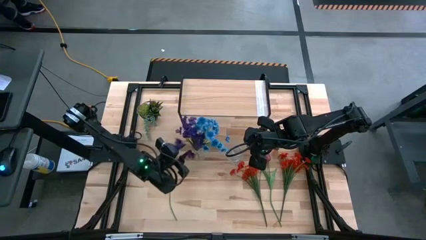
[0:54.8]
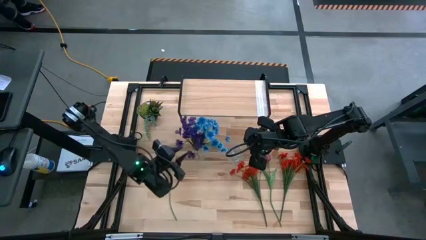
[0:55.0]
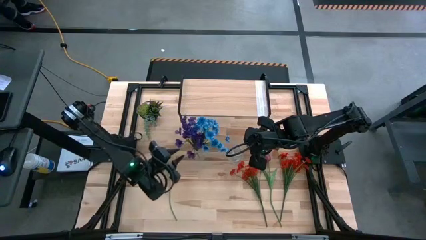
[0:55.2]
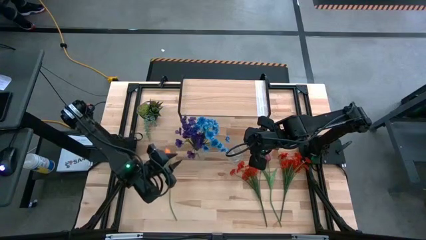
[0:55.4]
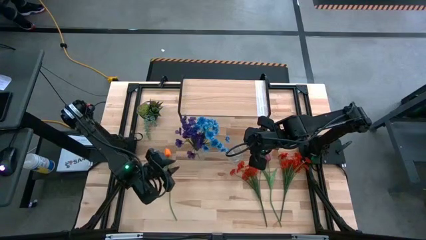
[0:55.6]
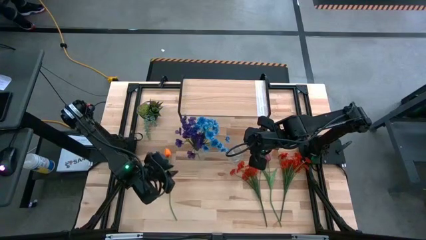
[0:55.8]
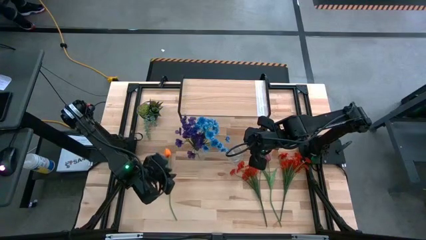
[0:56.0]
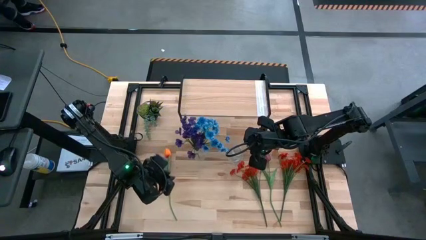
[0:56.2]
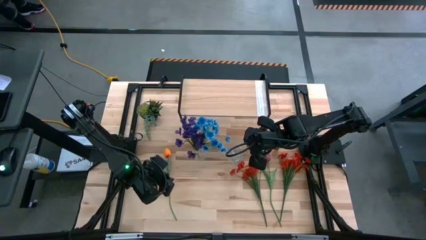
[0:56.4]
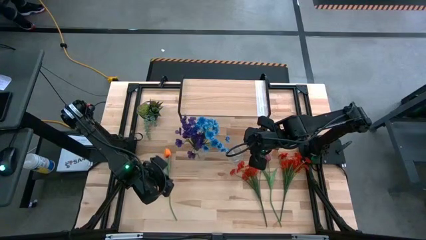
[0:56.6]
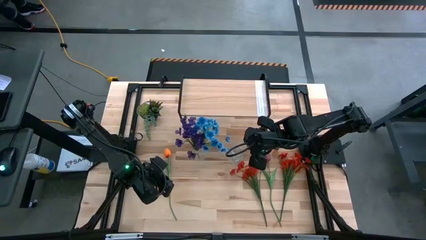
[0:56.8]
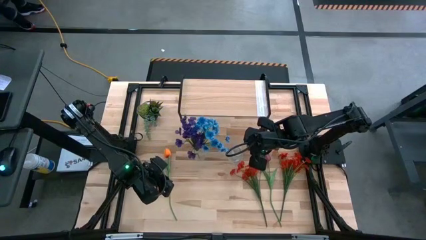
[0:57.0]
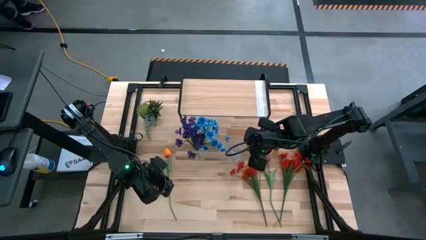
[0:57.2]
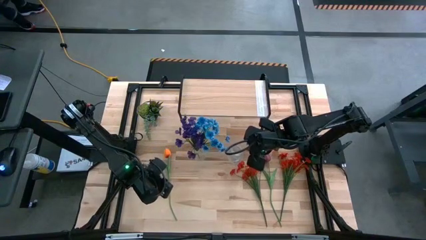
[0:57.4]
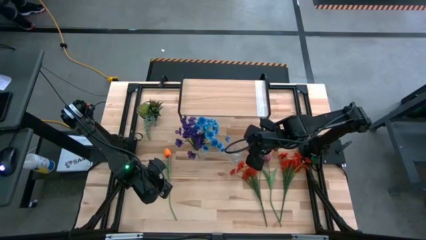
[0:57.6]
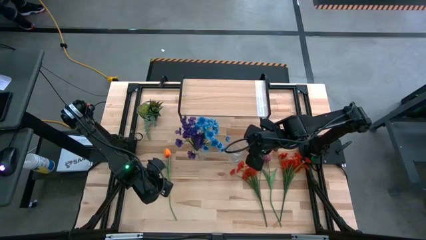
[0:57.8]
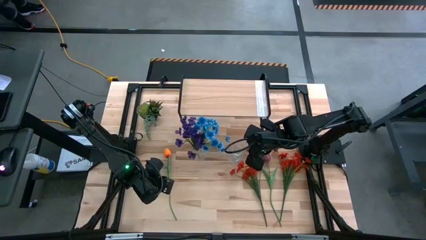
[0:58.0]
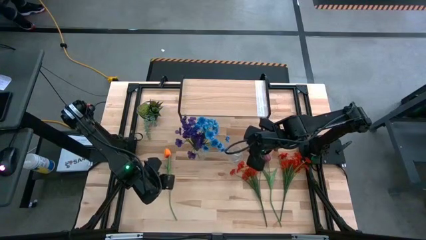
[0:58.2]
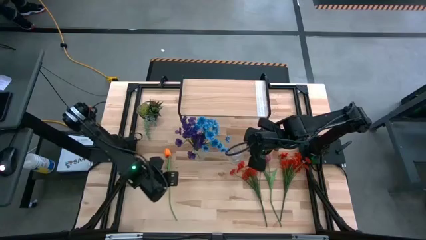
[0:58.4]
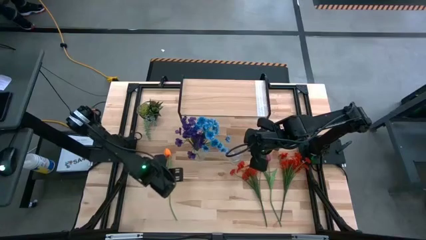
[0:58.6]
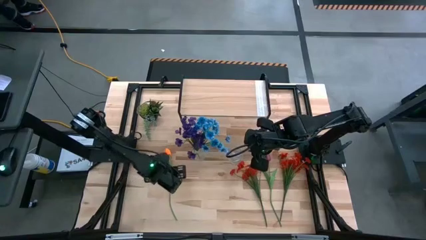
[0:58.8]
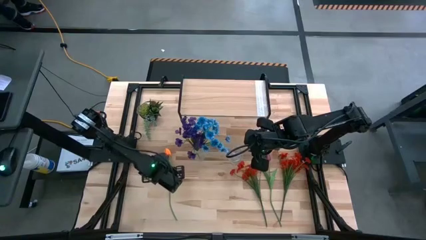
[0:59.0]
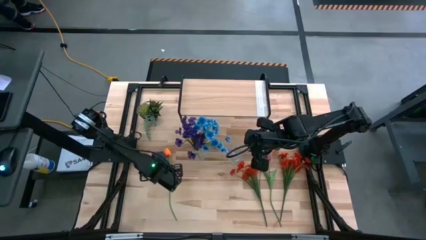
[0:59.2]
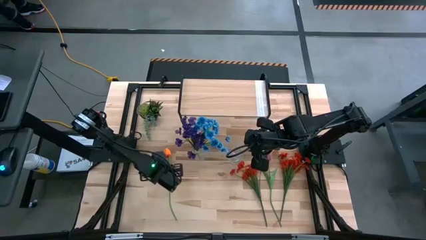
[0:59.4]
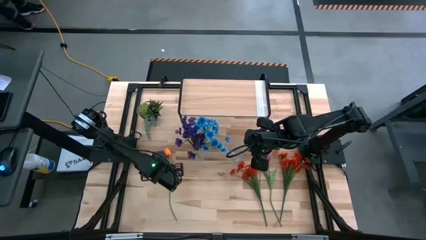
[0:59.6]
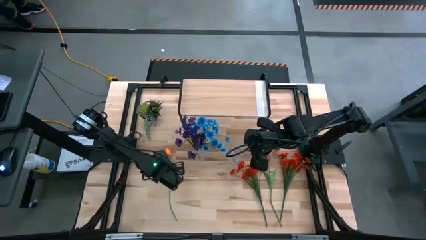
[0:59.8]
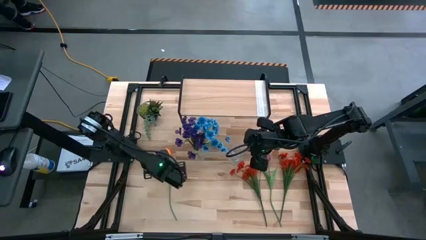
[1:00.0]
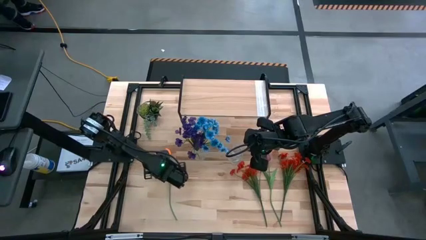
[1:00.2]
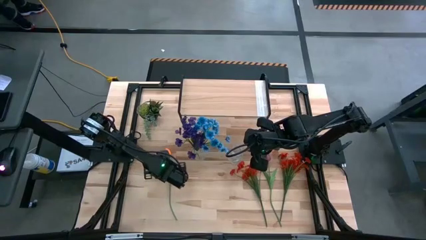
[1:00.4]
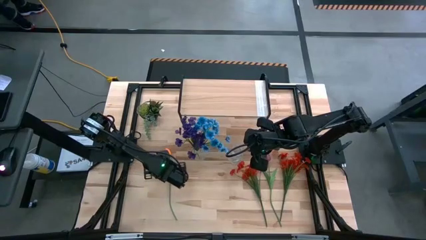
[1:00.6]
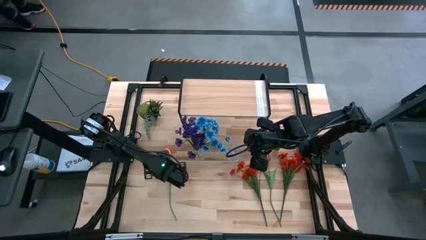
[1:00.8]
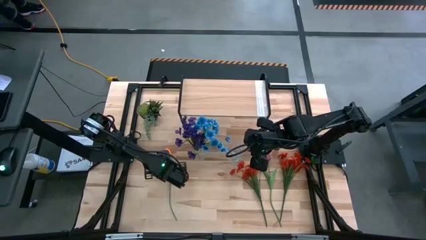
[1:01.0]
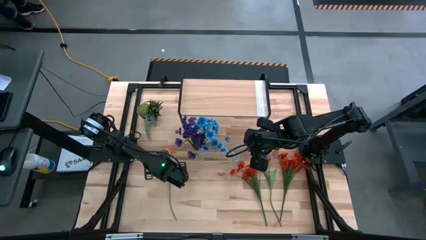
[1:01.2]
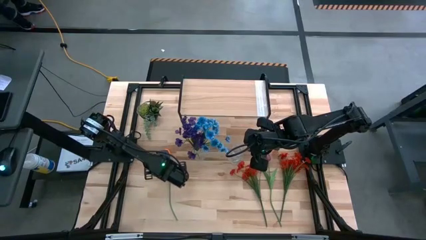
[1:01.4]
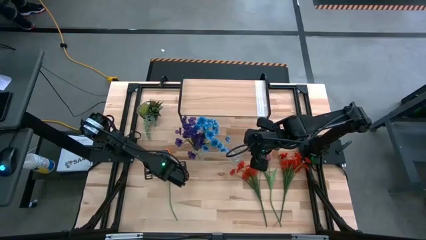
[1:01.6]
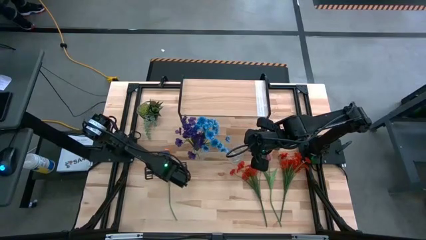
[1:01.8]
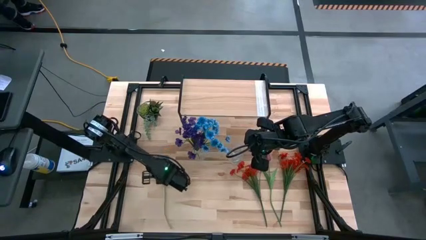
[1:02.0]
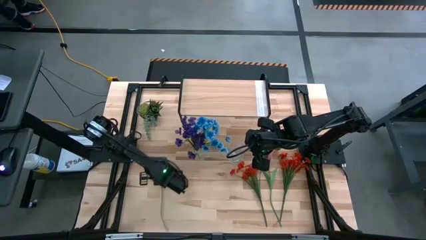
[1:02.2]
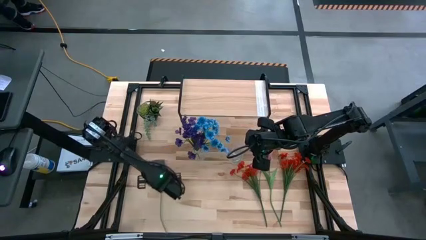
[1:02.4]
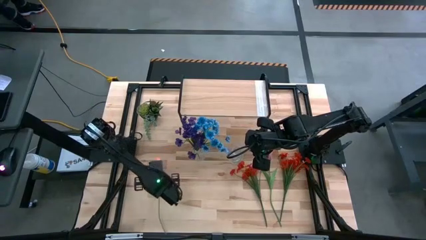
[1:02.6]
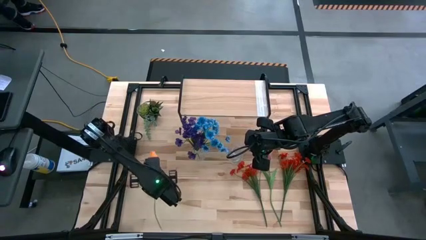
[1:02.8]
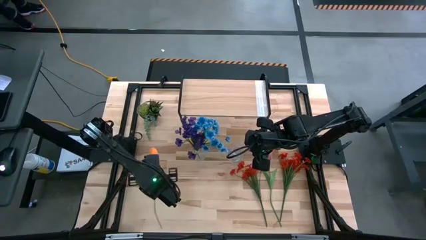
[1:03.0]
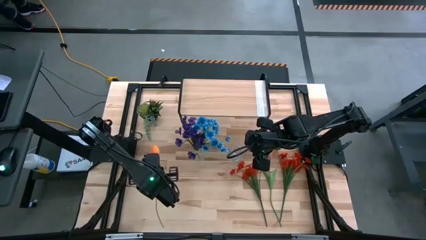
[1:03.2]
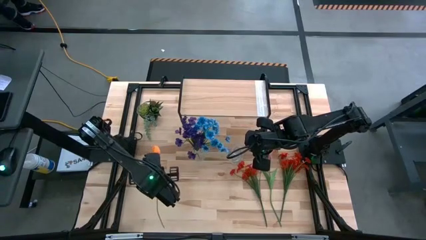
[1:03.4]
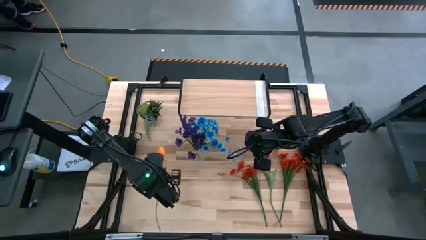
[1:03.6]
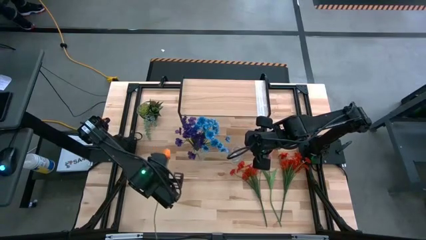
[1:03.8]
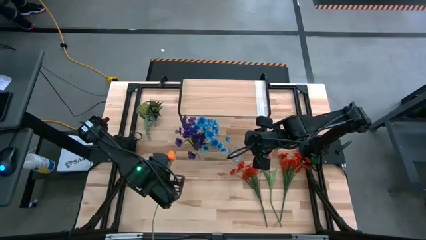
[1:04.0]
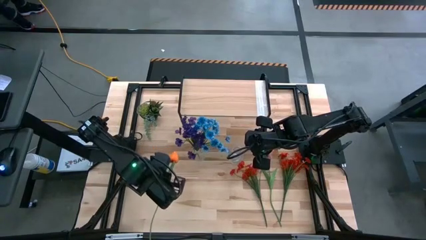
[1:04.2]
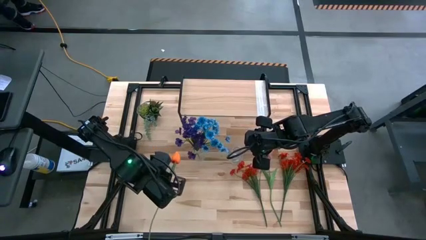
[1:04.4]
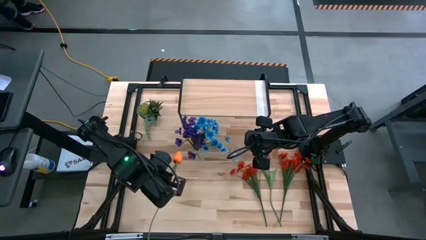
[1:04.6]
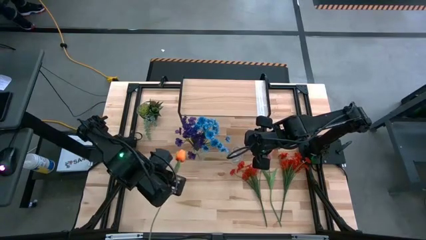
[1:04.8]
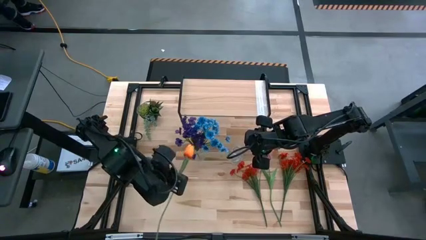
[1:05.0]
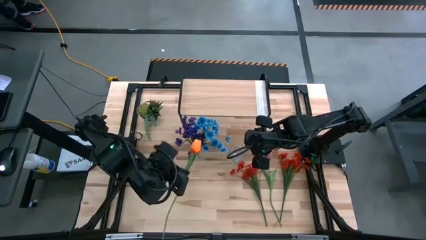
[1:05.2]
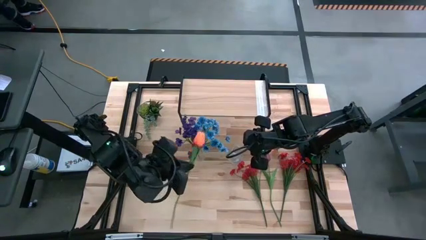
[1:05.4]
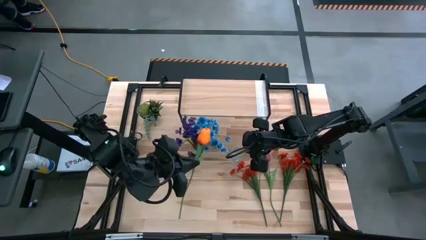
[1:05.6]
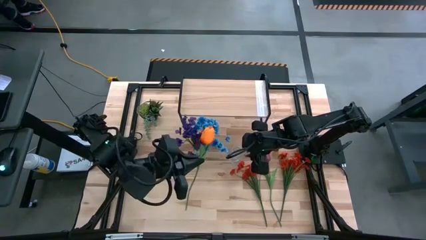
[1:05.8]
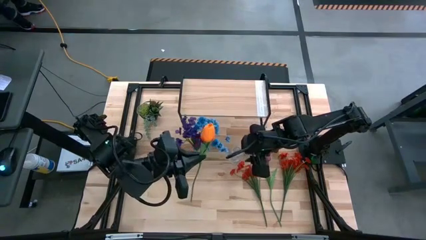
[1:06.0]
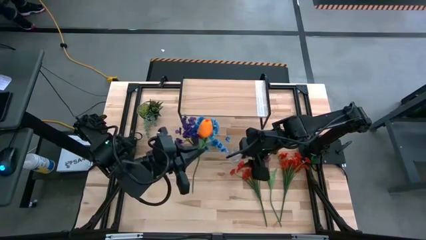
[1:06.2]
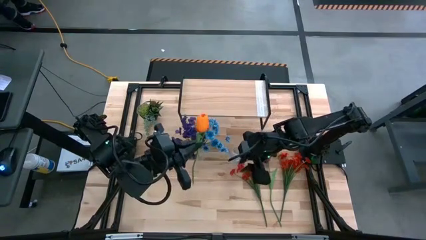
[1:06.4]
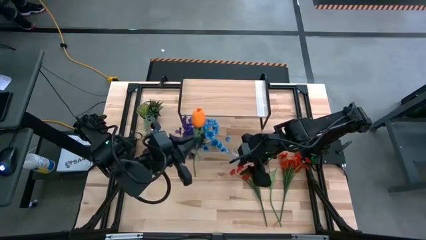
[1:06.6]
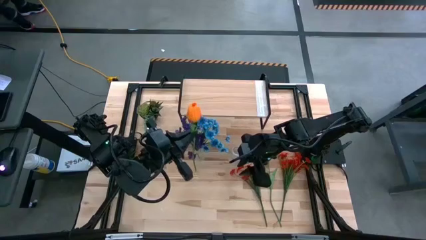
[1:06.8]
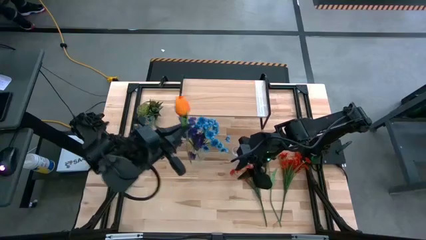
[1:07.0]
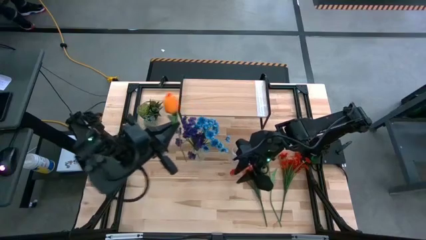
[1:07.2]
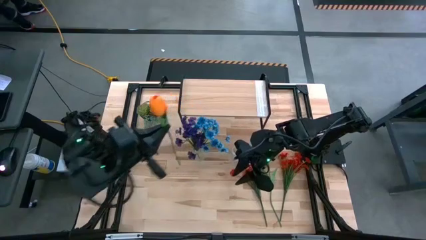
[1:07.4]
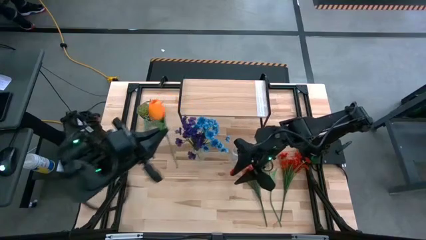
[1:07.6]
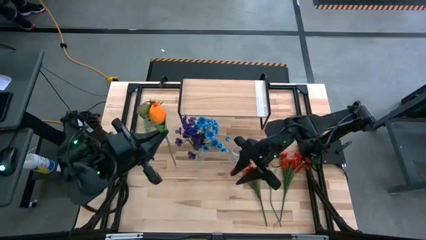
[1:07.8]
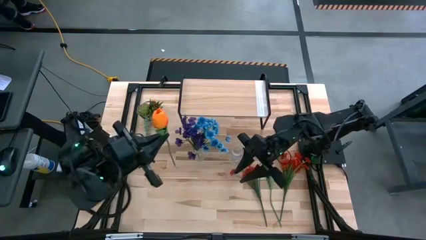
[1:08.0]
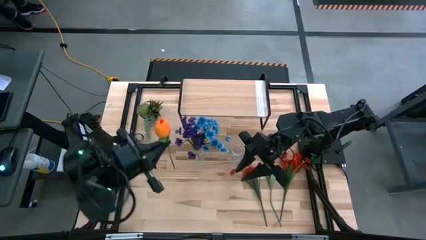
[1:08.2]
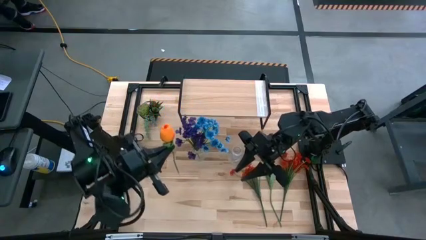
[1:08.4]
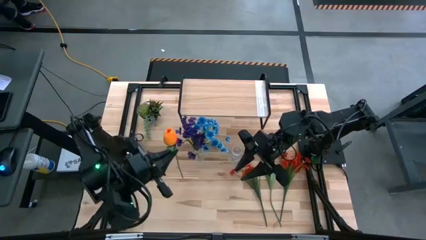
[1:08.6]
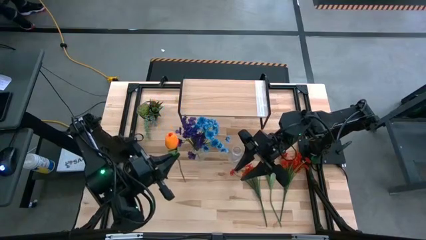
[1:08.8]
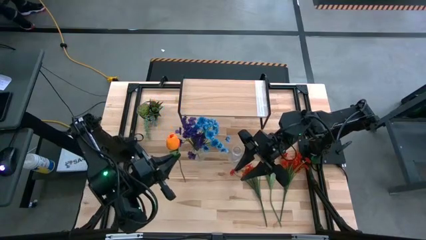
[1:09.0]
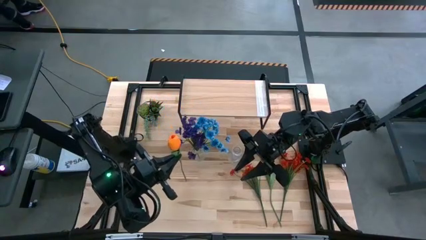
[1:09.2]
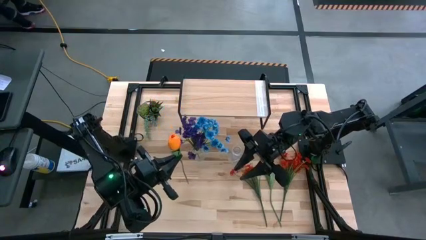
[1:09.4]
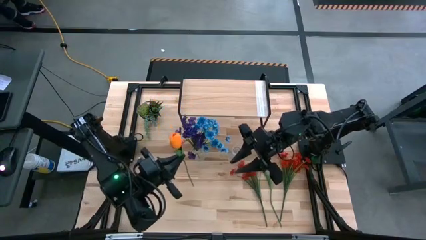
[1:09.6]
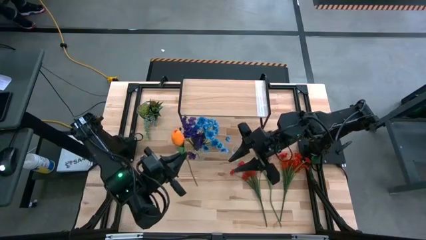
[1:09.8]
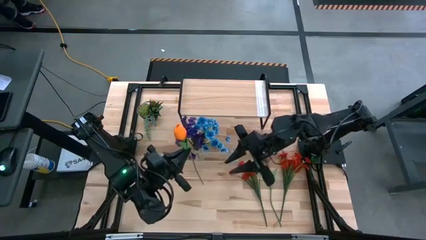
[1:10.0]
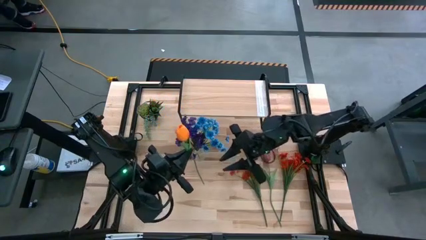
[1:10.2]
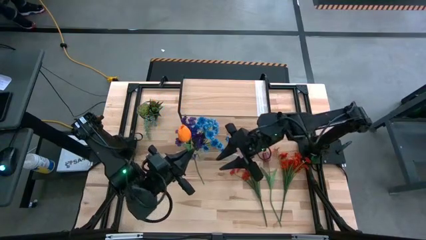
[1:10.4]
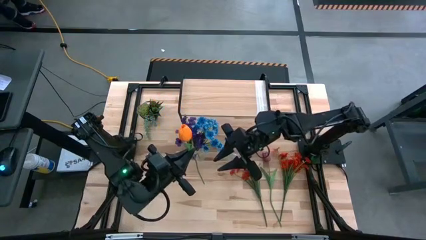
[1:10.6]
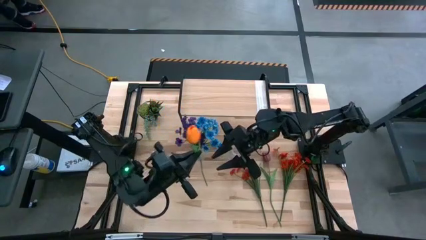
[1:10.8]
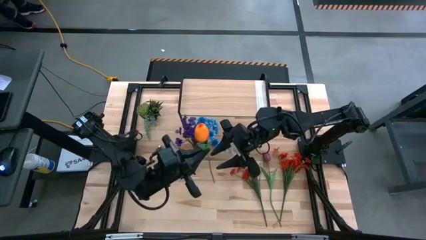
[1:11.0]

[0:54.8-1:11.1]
Task: Pick and place flowers into a vace then onto a shelf
Put the orange flower into the left transparent crystal vase
